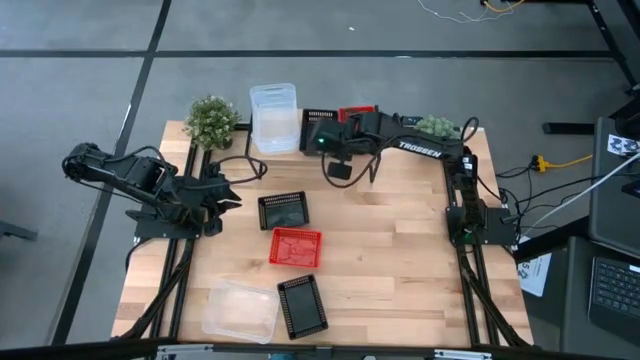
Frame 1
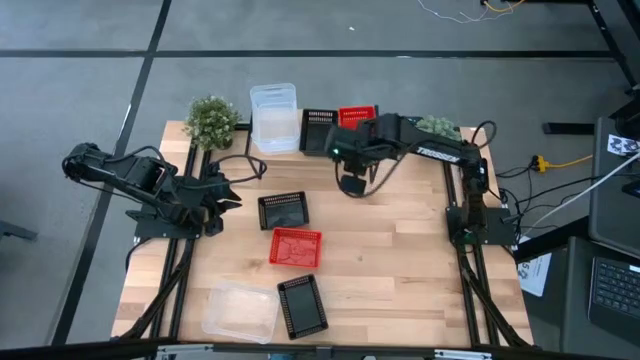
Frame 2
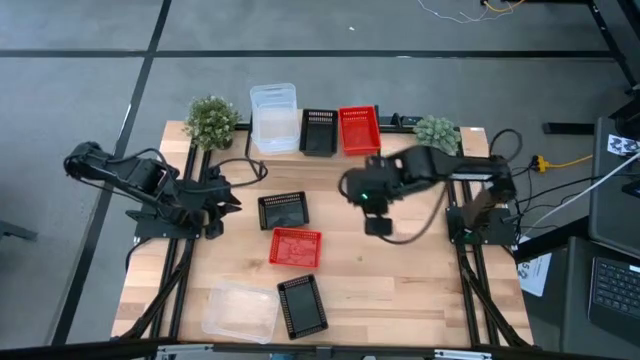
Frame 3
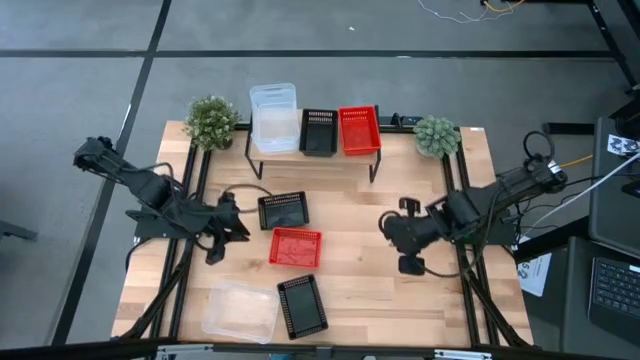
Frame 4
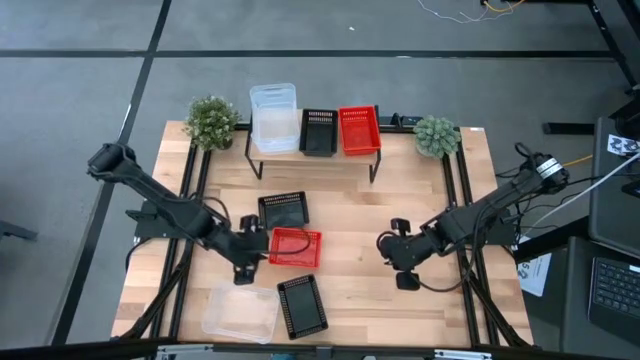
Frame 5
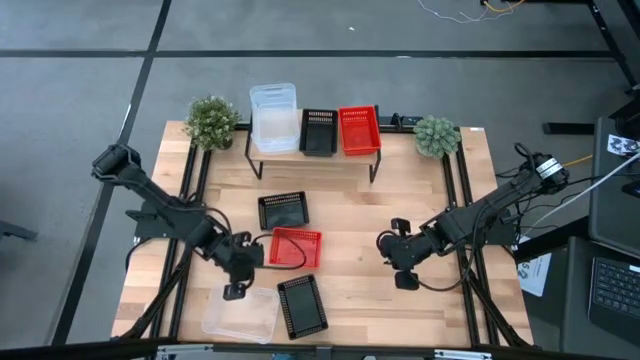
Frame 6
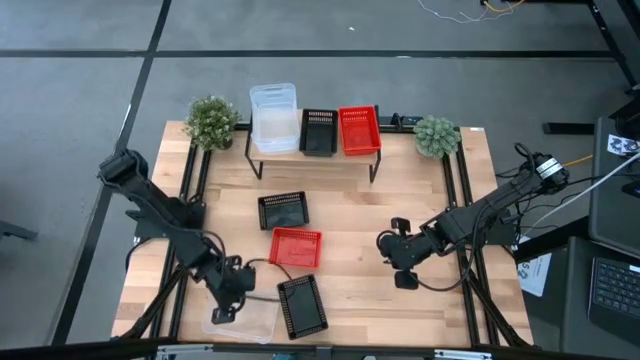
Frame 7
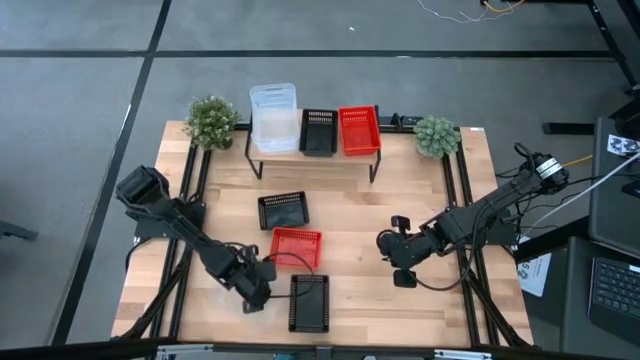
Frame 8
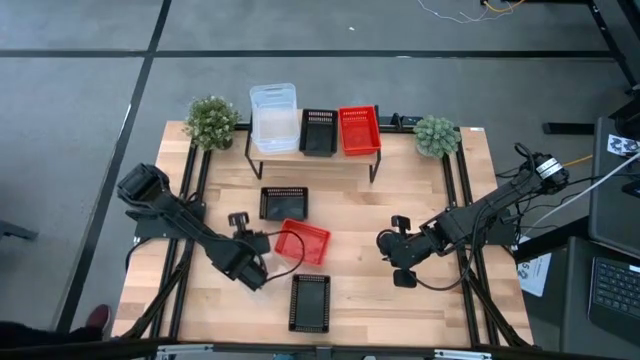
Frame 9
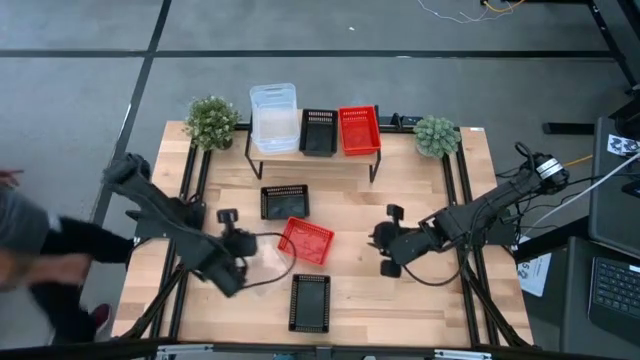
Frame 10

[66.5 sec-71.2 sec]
Task: Stack baskets on shelf by color
Adjust the transparent bin on the table

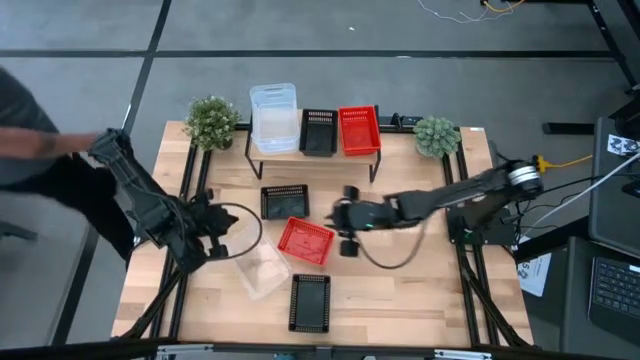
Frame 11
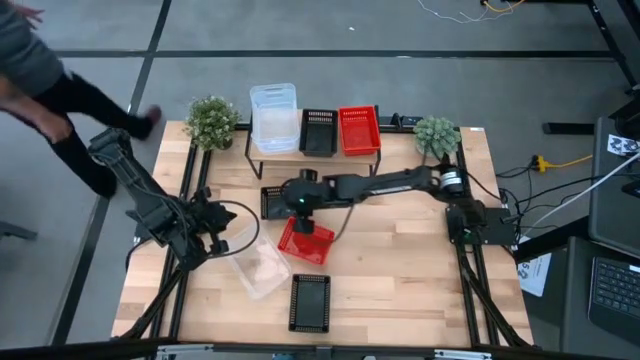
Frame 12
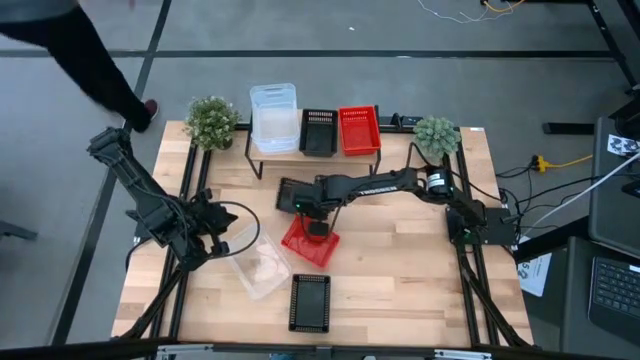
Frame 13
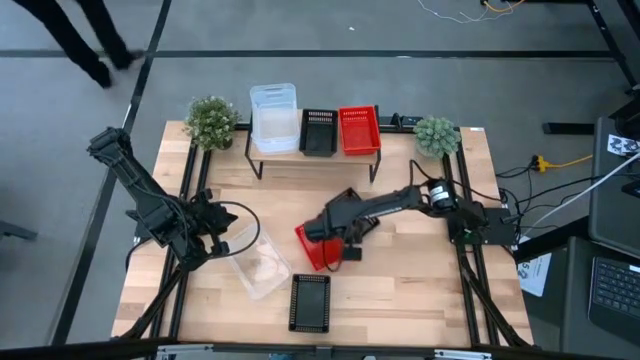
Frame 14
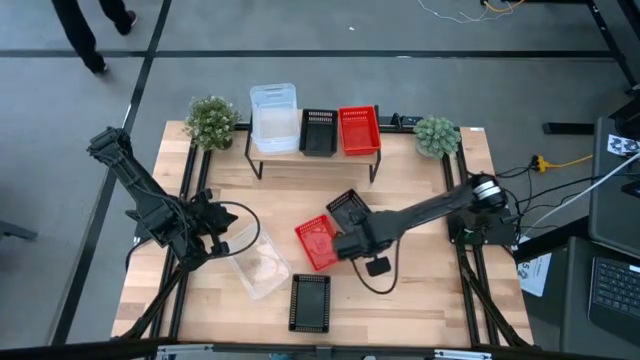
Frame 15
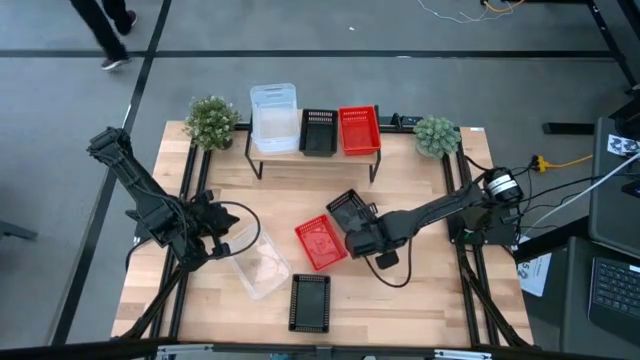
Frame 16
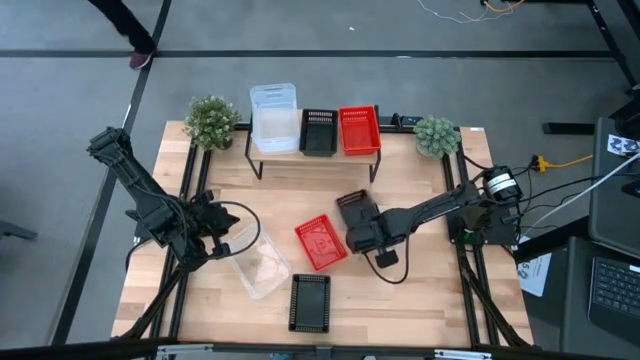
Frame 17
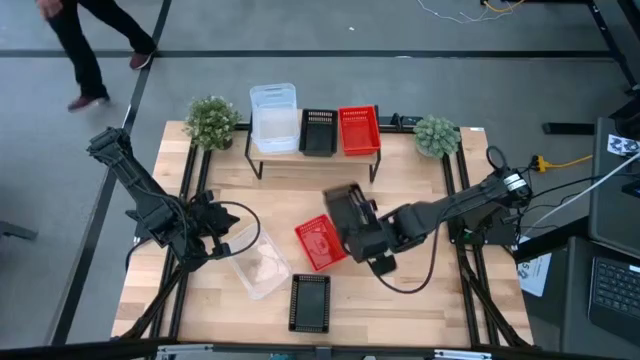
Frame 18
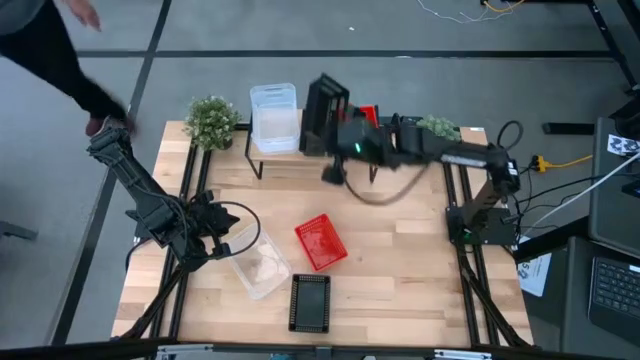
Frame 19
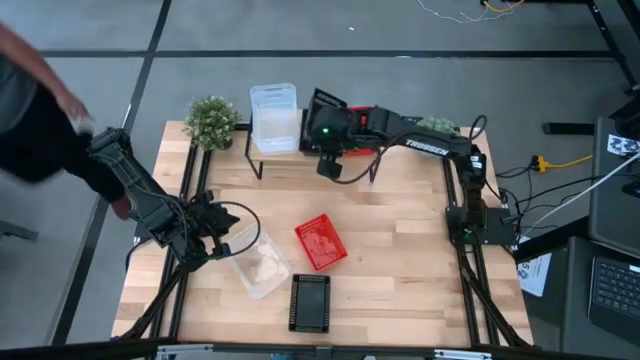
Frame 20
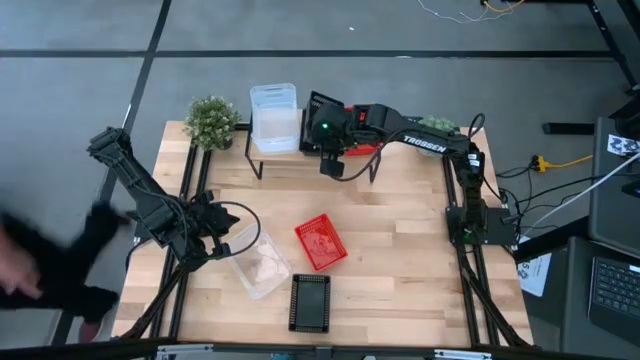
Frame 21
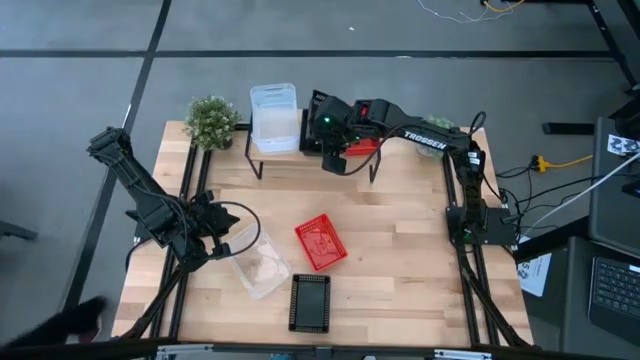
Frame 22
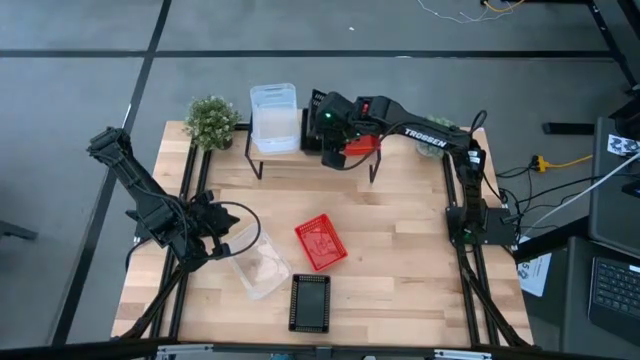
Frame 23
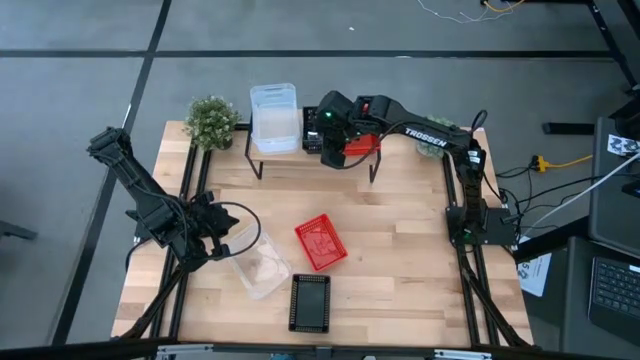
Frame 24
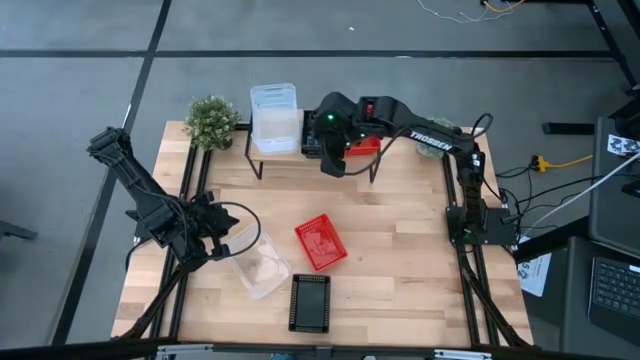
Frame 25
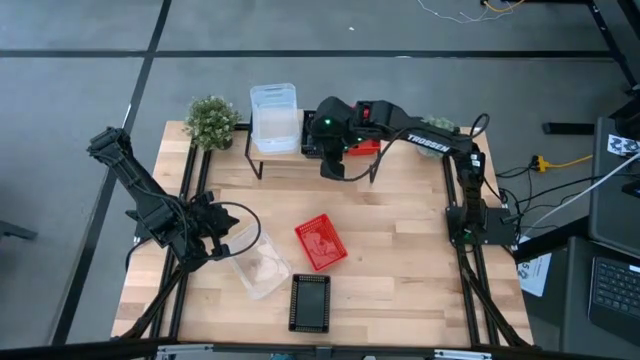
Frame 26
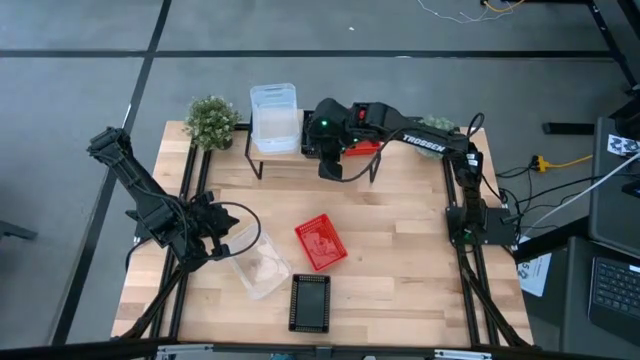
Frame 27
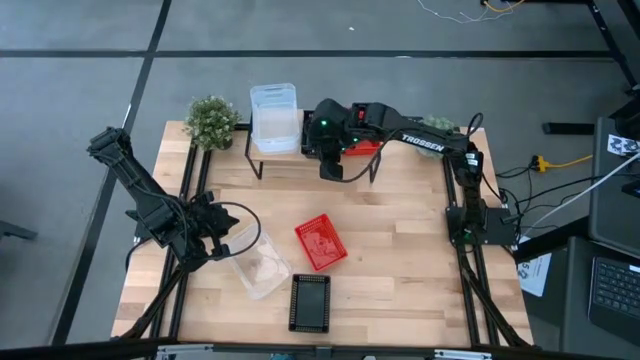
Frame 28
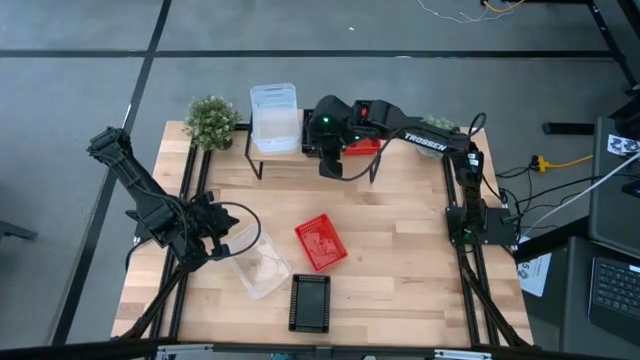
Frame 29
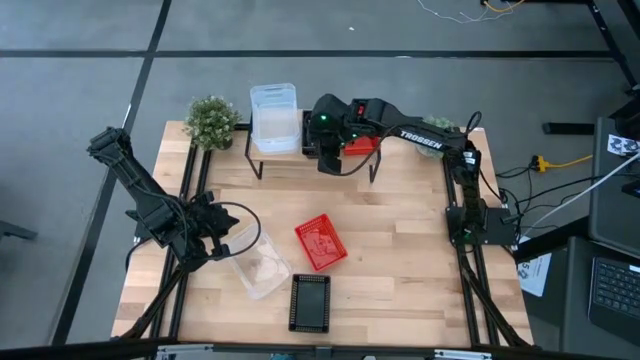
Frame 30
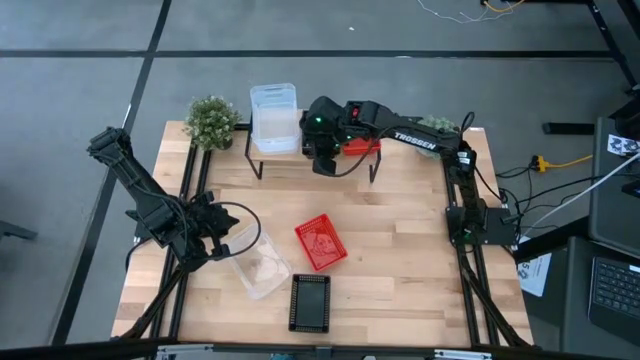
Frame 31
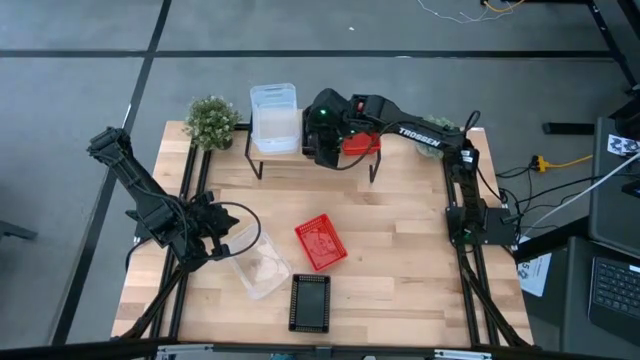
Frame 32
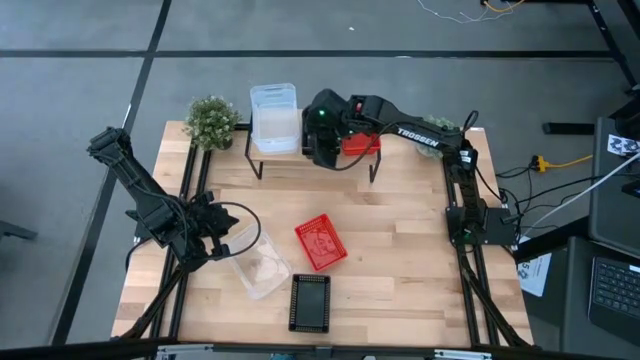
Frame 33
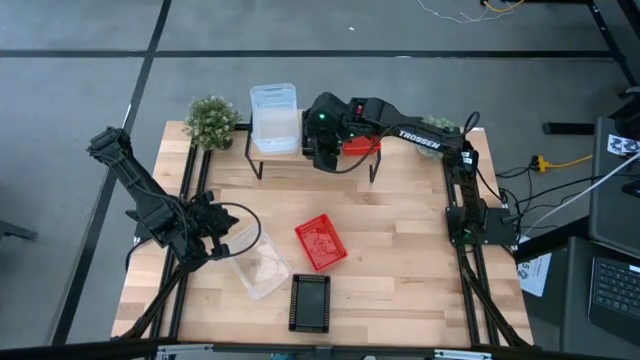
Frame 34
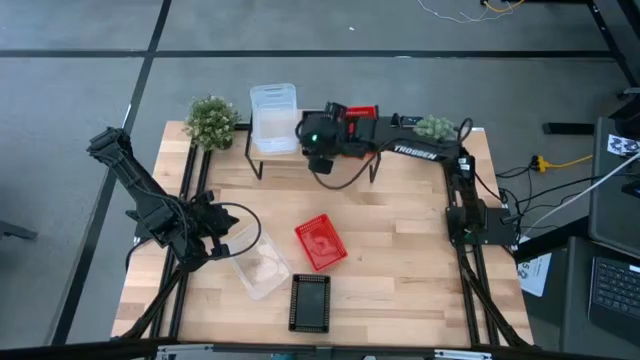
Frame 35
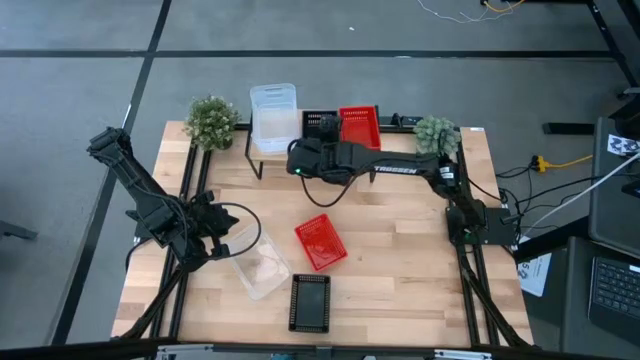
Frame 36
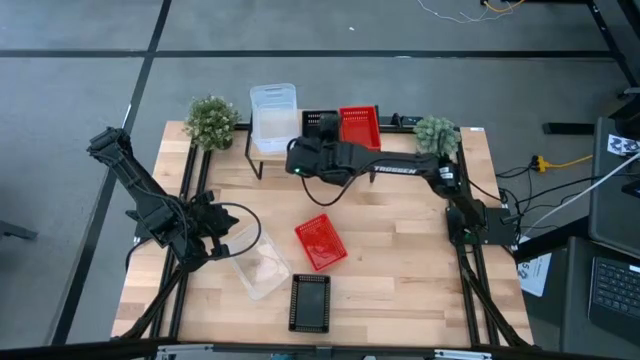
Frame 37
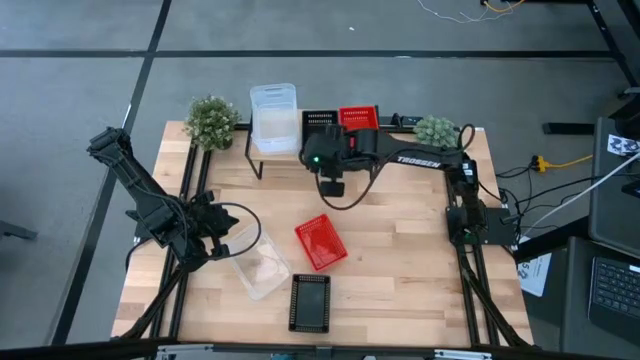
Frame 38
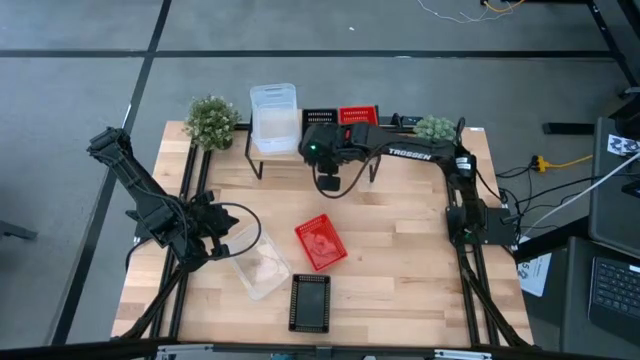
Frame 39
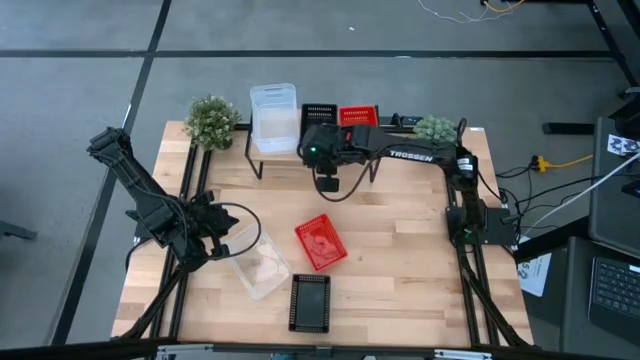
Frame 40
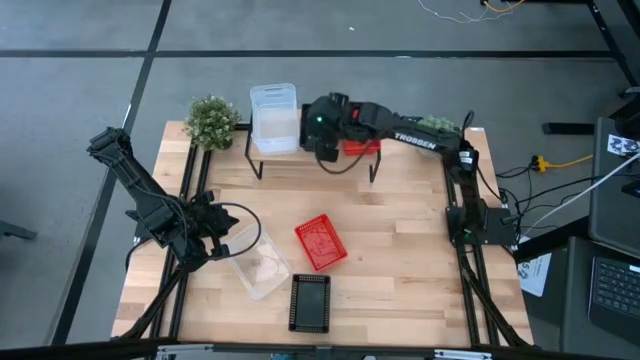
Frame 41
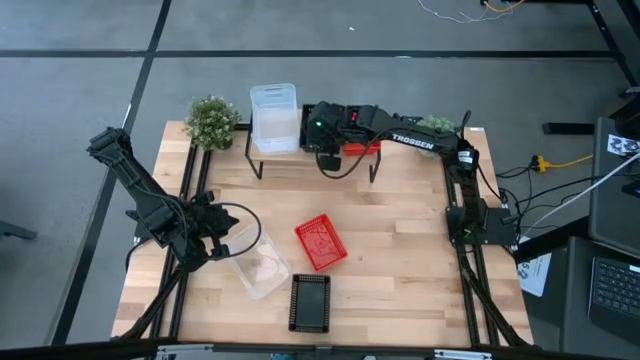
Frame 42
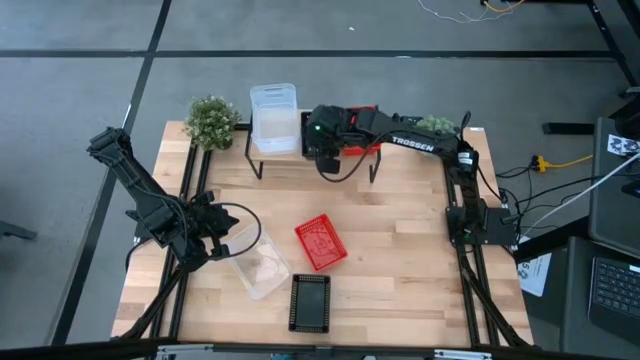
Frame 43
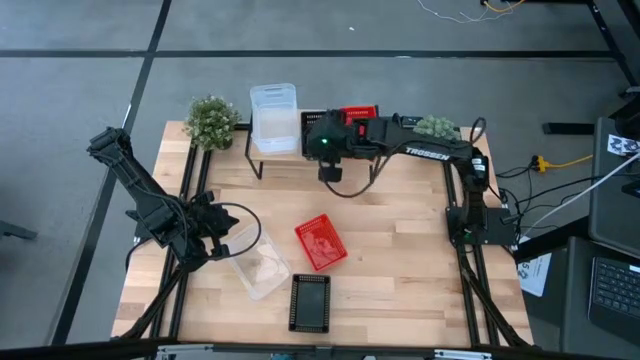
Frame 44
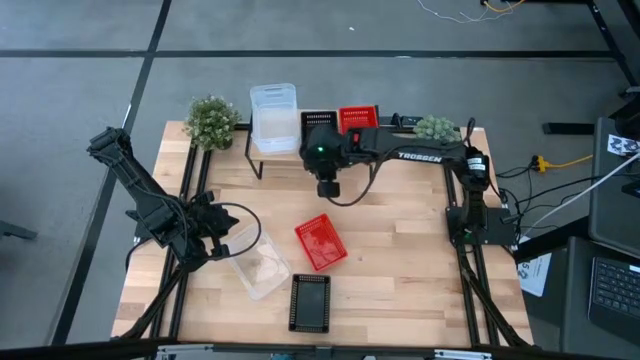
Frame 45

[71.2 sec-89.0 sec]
Stack the top black bin on top of the black bin on the shelf
